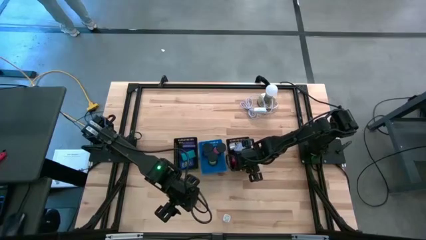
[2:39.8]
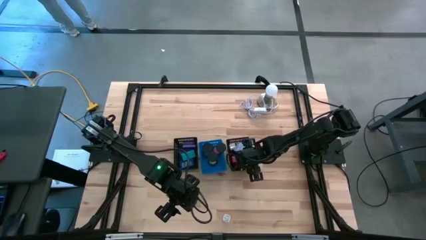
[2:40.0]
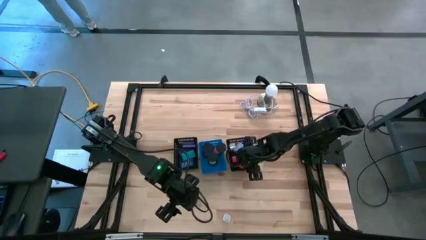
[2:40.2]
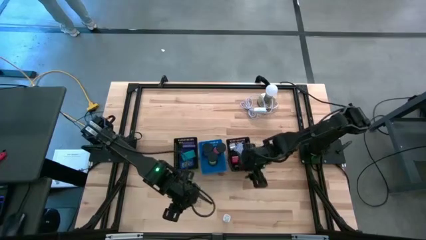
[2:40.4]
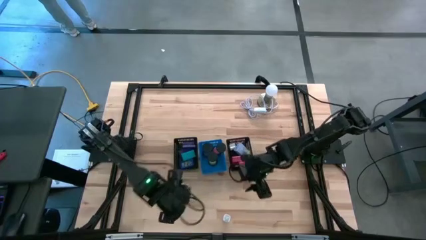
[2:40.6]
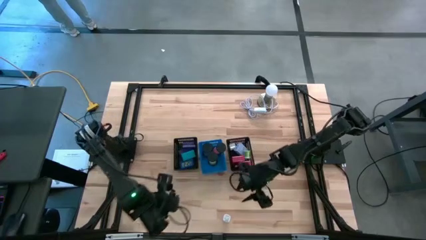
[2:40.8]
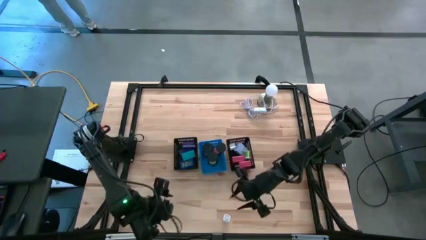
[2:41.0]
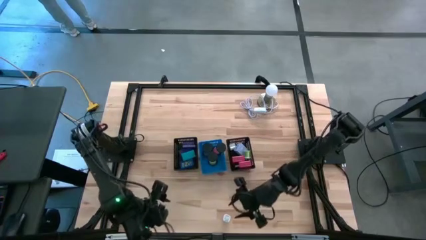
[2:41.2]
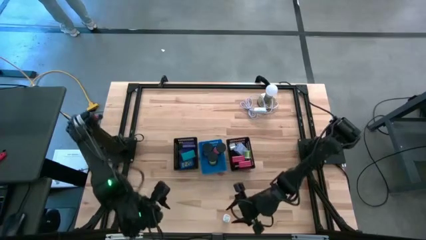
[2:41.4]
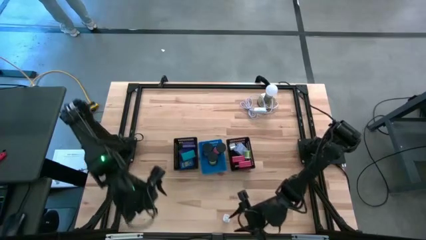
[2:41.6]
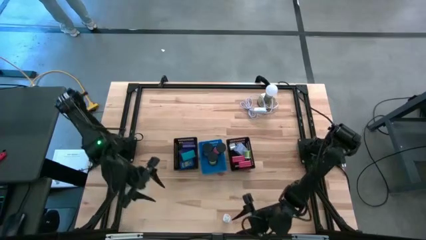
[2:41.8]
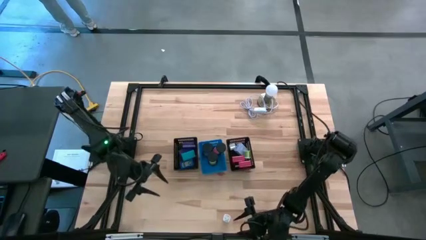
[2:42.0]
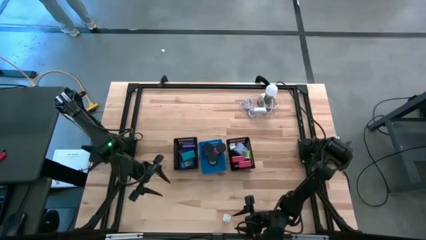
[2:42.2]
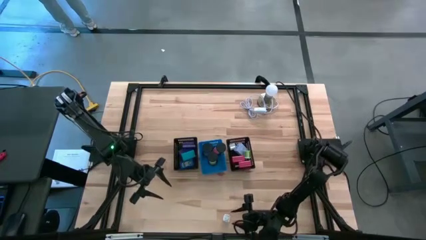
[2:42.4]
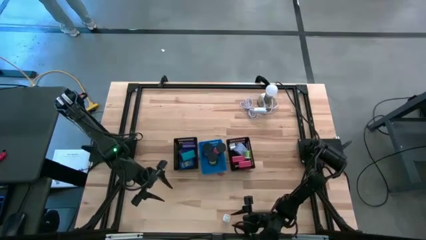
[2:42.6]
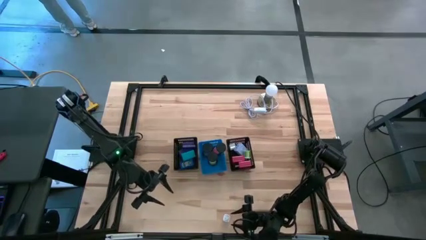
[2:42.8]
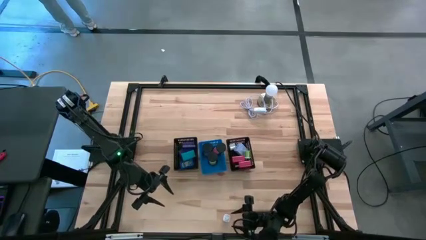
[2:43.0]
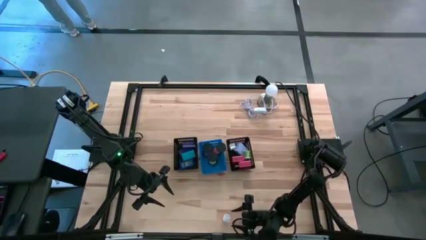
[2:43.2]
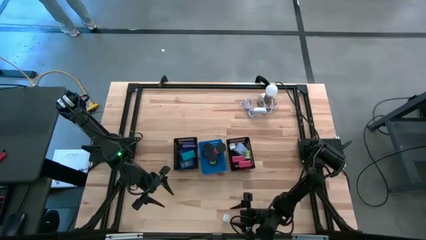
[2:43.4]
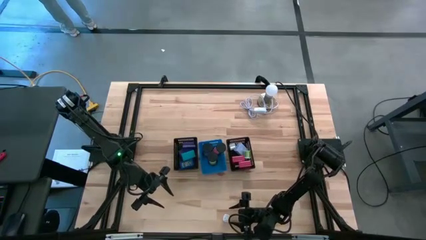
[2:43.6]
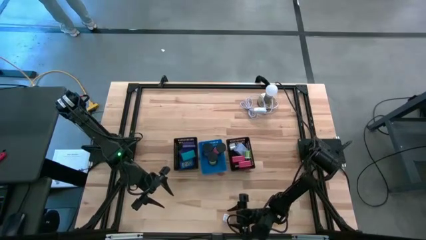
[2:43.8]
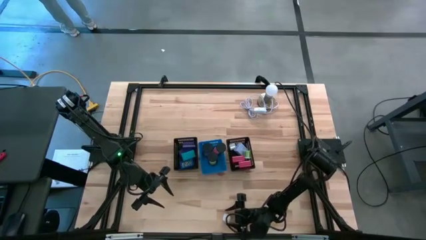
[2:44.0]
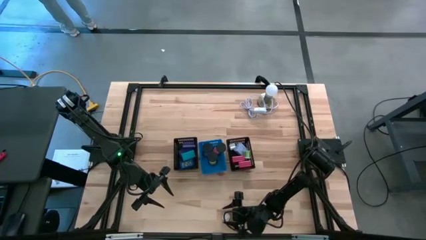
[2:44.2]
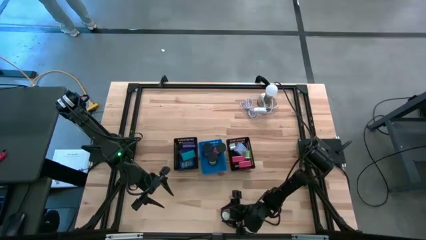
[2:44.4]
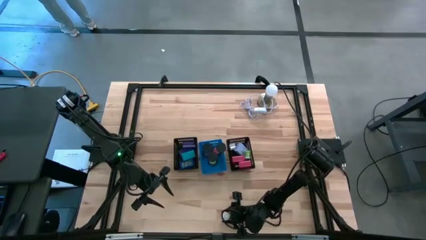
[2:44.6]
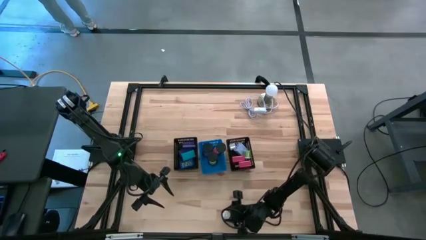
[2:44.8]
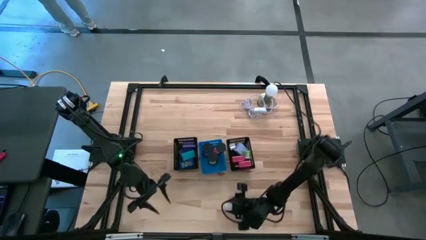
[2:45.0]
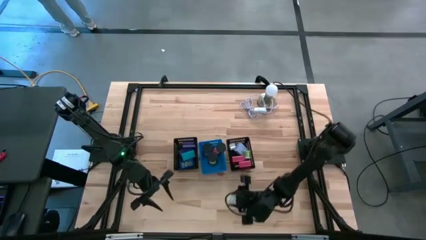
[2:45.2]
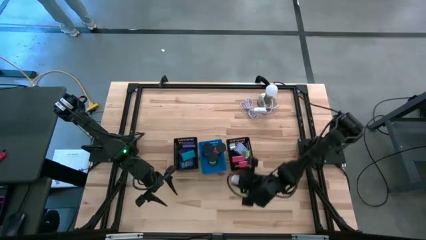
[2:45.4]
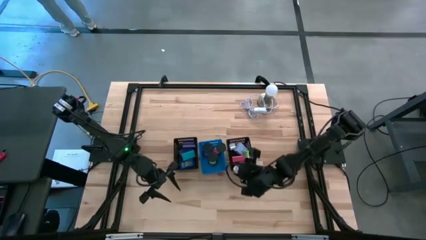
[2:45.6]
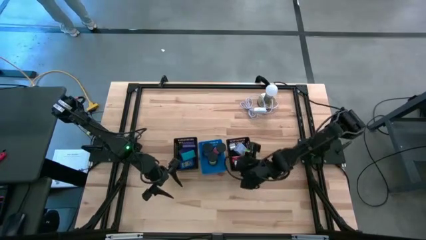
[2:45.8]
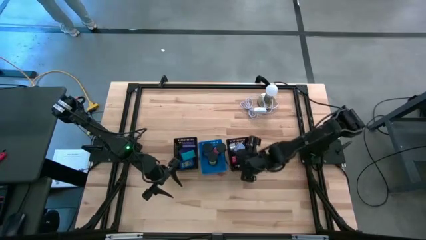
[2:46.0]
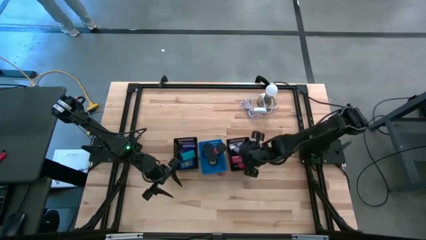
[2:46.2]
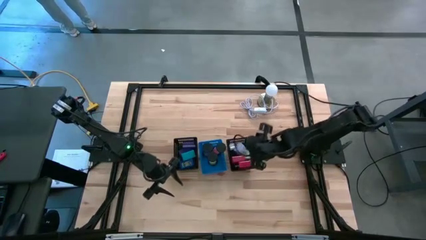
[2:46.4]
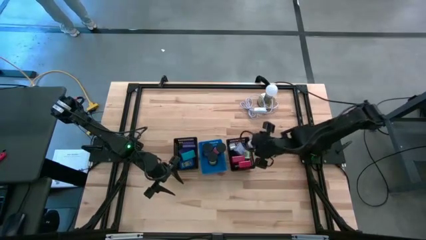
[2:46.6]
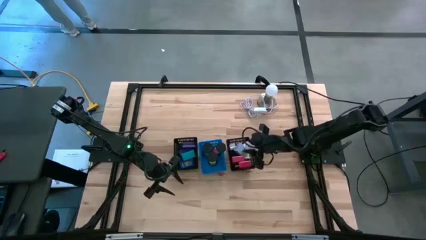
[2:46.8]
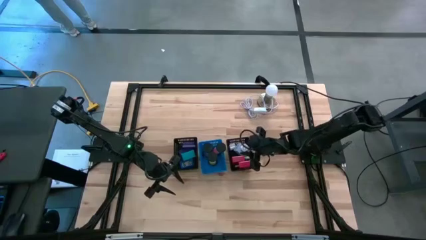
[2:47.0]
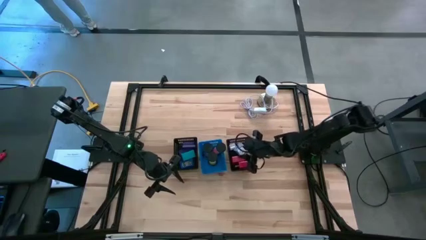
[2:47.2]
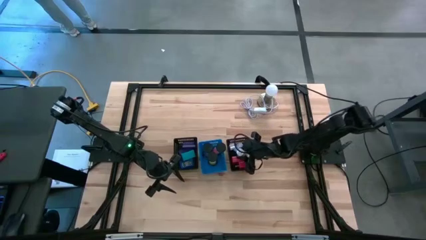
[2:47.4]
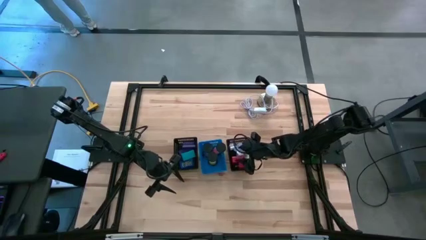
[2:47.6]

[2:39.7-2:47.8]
Task: Pick & Place Office items
Put the pink charger adapter into the right black bin

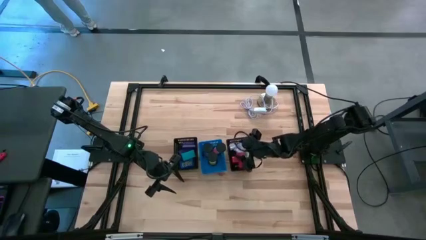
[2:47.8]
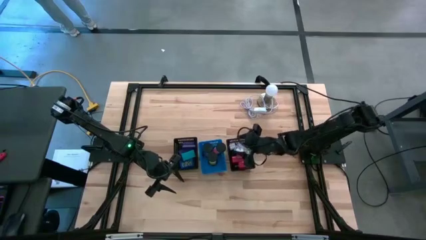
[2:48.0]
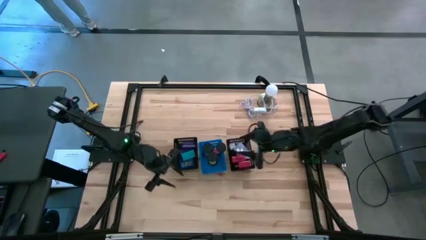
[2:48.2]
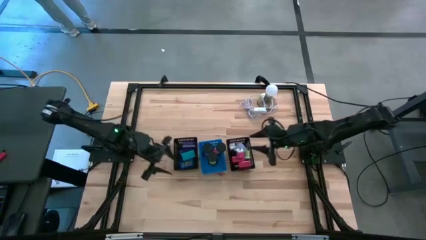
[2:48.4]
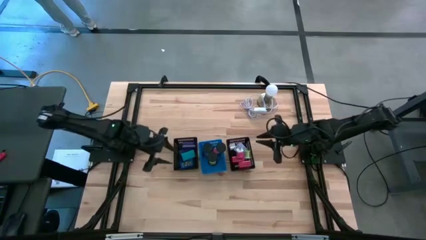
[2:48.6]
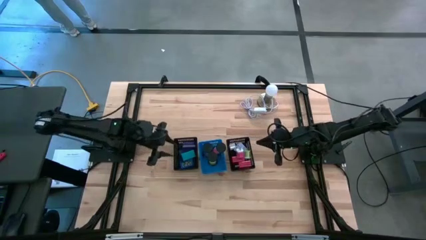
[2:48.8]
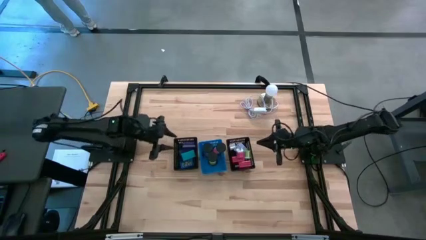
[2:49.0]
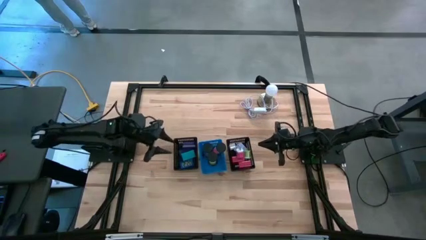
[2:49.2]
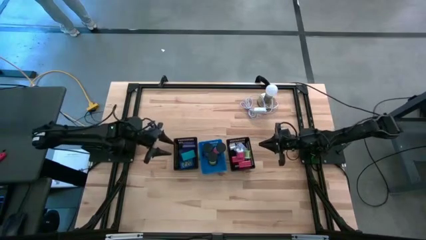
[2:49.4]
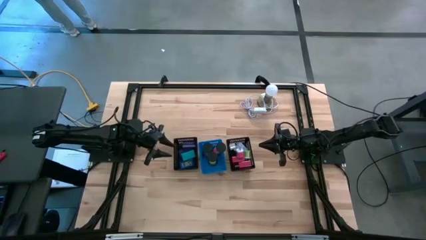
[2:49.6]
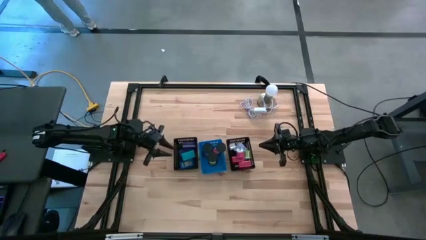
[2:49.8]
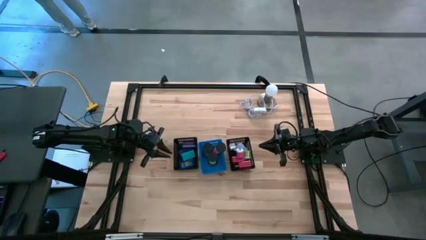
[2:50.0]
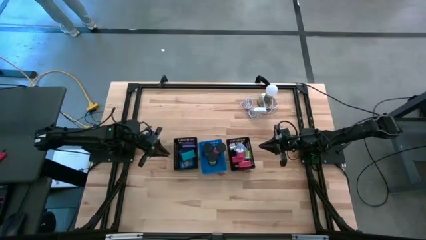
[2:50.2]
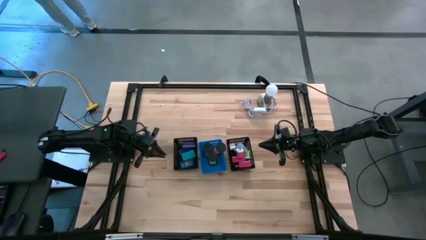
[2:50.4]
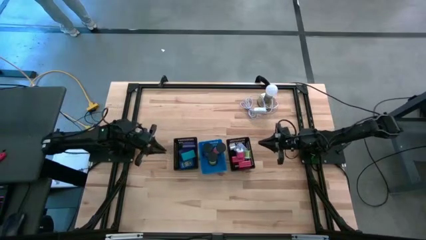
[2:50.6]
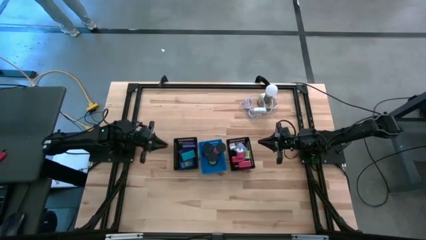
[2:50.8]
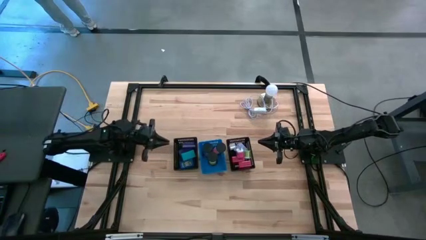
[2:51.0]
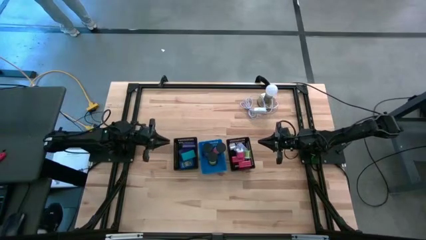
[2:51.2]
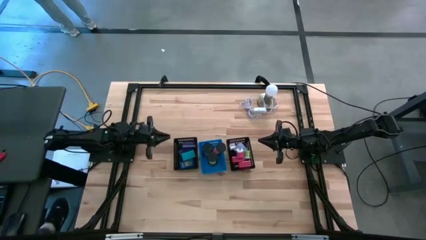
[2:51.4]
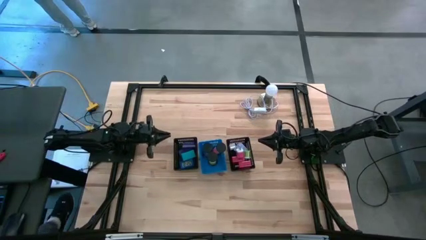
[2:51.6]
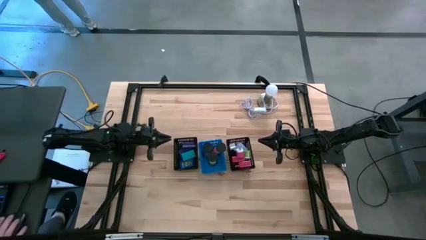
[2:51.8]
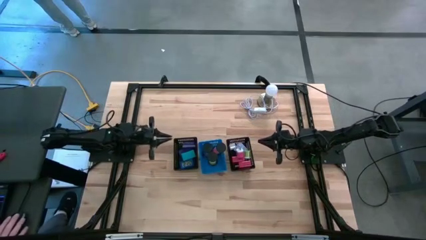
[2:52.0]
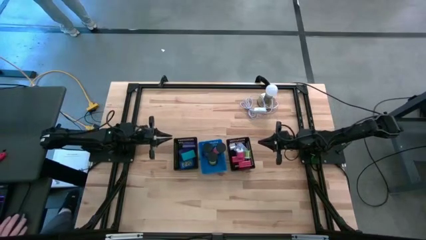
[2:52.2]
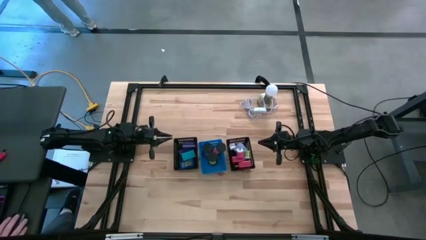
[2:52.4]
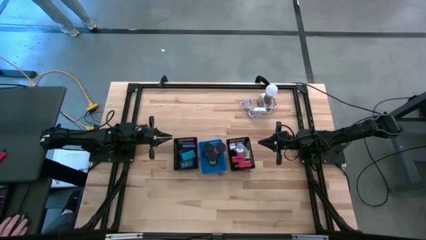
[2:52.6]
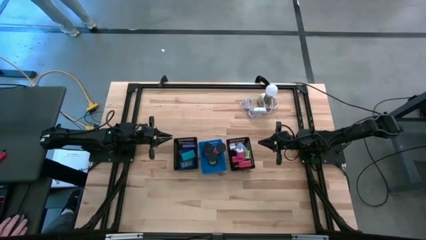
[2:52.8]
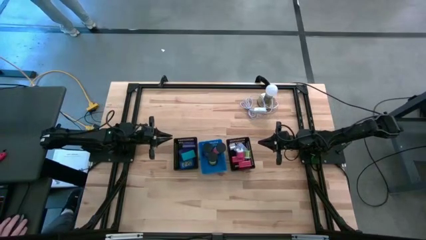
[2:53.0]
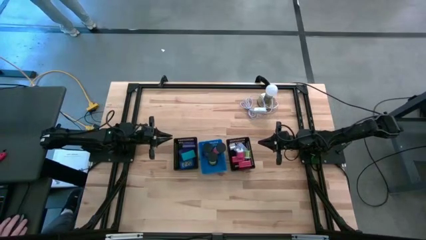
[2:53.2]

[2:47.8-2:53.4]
Return to Home Position
